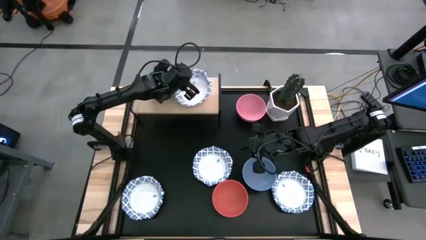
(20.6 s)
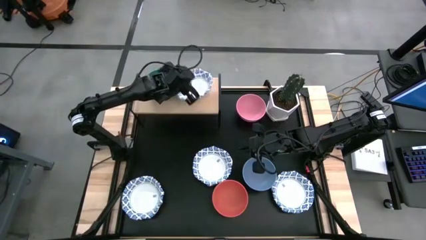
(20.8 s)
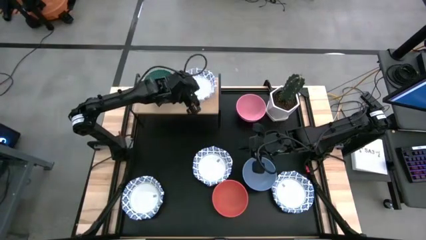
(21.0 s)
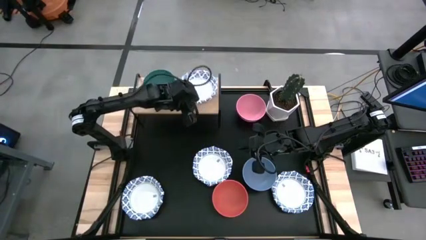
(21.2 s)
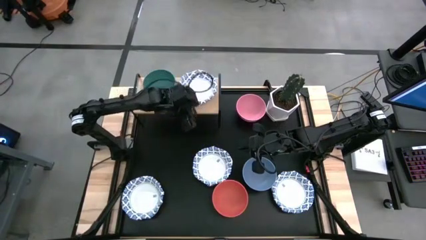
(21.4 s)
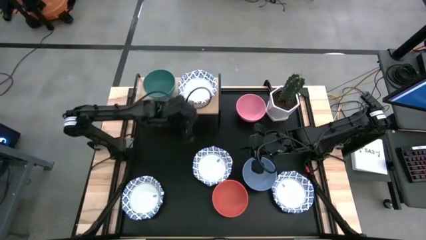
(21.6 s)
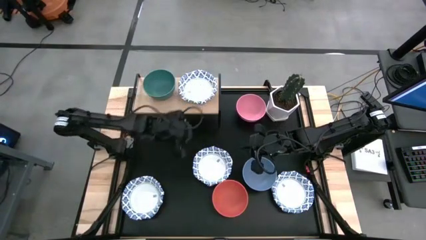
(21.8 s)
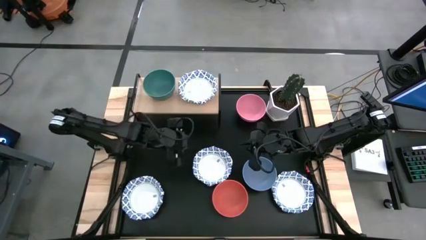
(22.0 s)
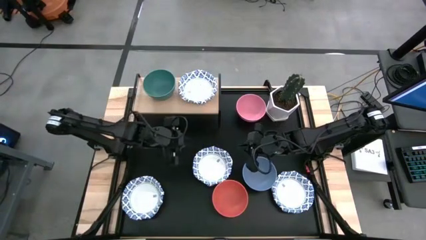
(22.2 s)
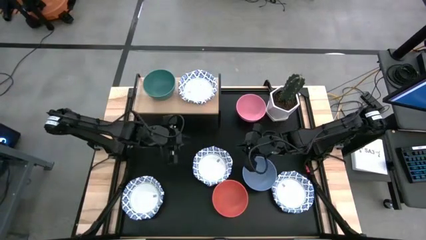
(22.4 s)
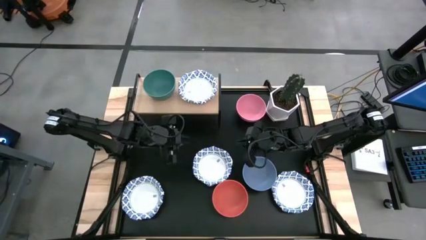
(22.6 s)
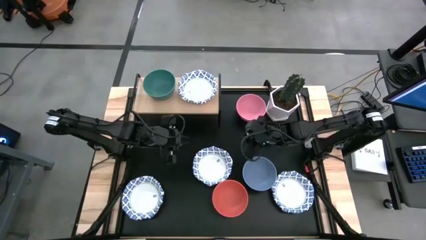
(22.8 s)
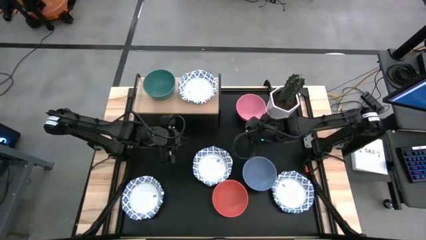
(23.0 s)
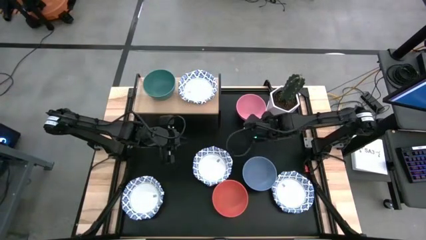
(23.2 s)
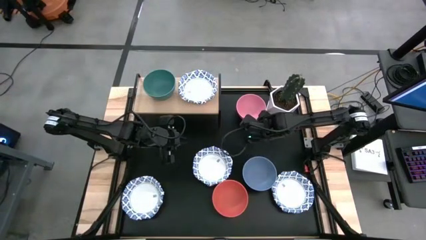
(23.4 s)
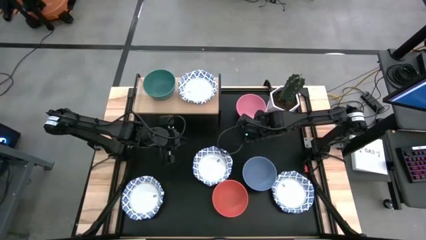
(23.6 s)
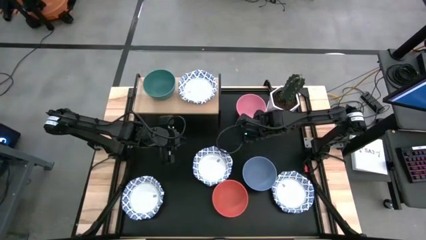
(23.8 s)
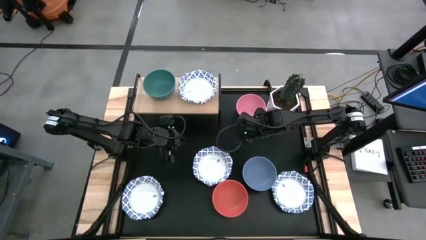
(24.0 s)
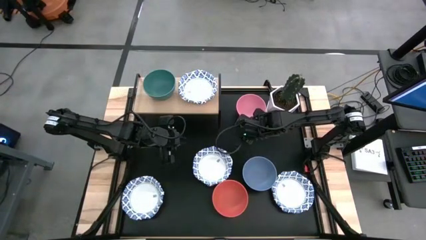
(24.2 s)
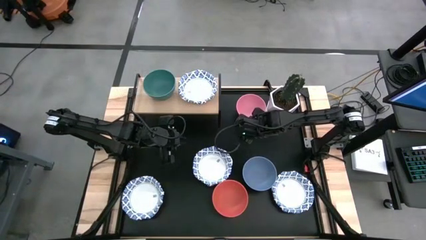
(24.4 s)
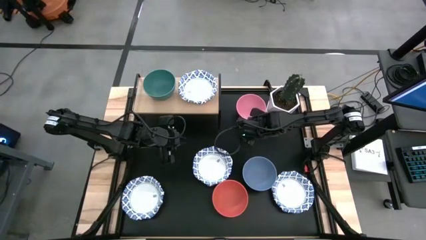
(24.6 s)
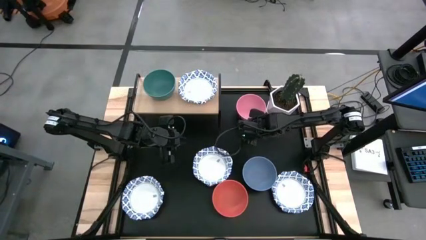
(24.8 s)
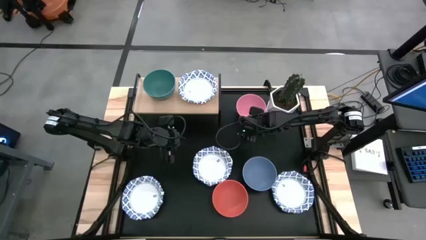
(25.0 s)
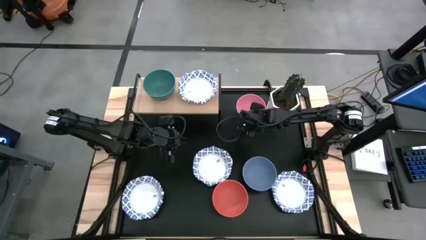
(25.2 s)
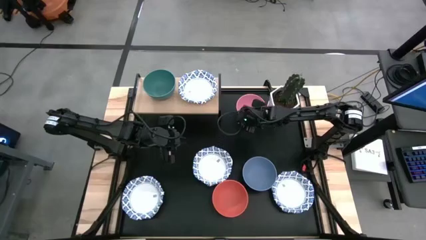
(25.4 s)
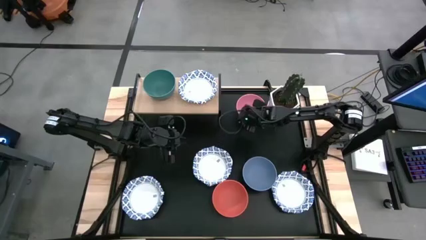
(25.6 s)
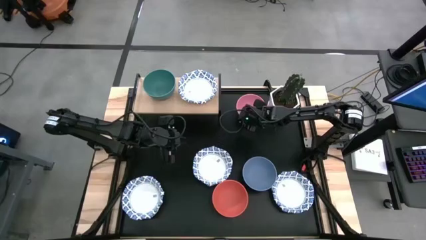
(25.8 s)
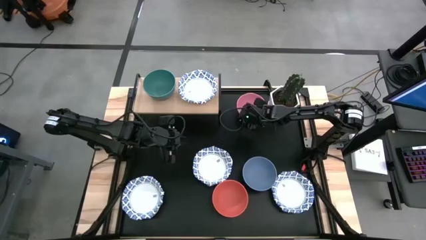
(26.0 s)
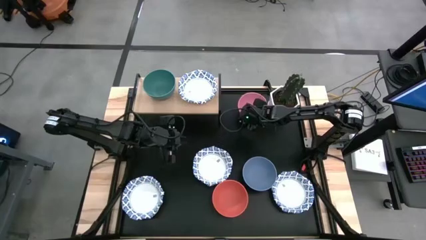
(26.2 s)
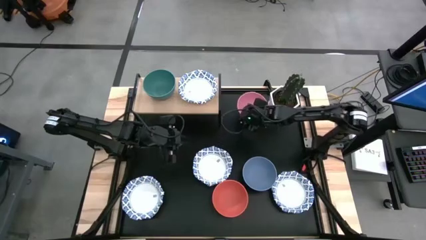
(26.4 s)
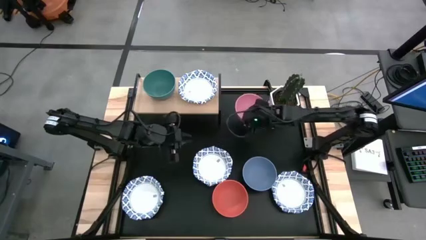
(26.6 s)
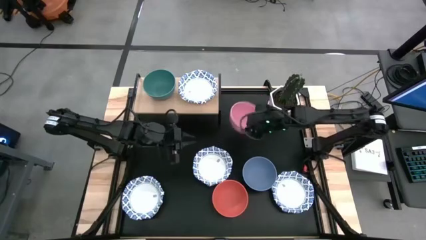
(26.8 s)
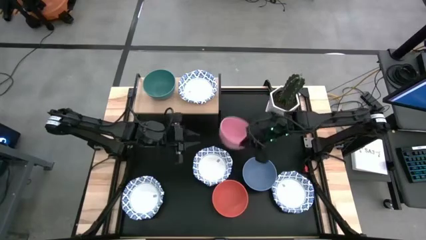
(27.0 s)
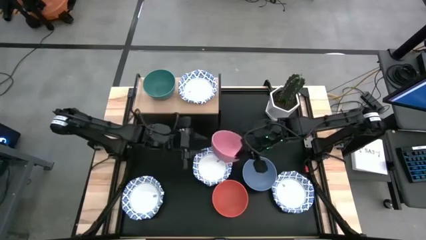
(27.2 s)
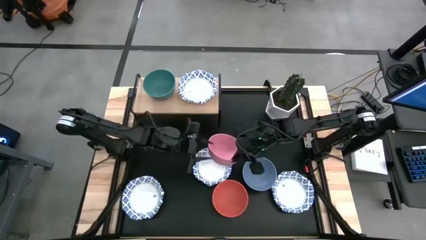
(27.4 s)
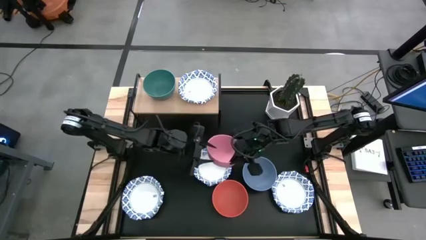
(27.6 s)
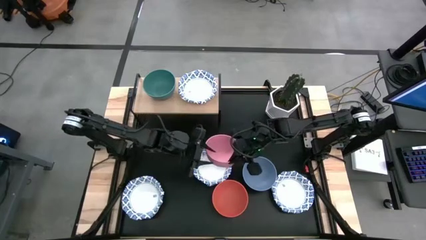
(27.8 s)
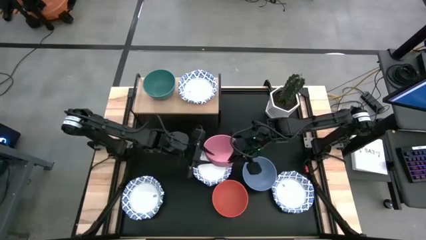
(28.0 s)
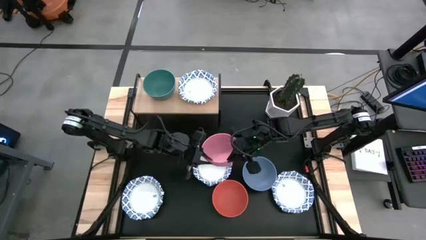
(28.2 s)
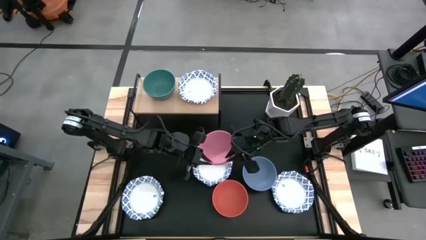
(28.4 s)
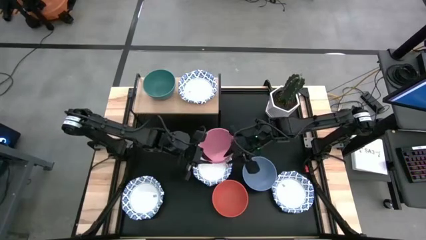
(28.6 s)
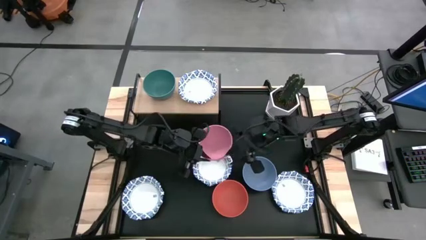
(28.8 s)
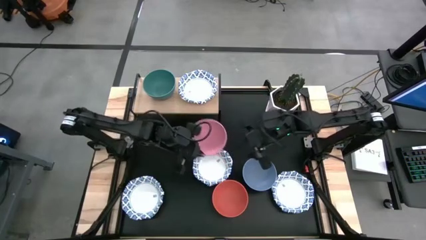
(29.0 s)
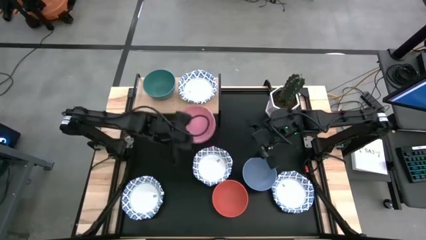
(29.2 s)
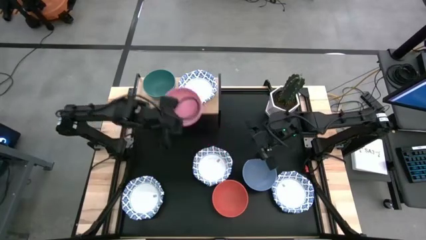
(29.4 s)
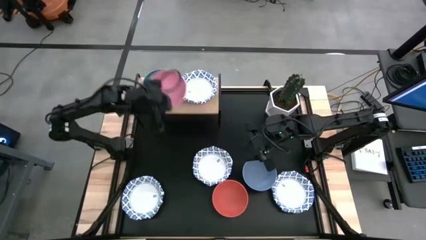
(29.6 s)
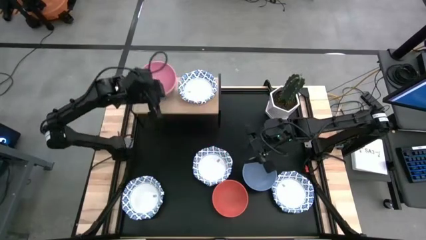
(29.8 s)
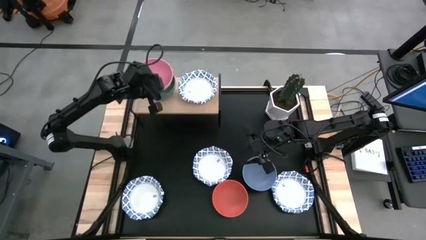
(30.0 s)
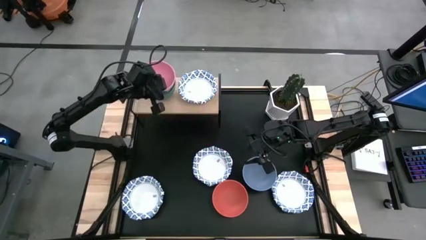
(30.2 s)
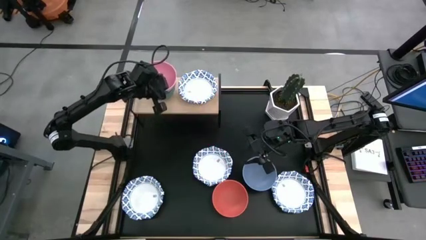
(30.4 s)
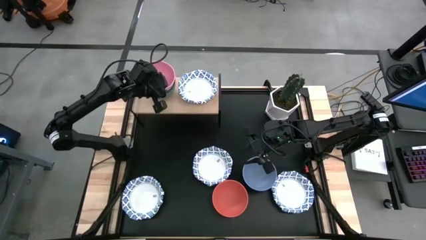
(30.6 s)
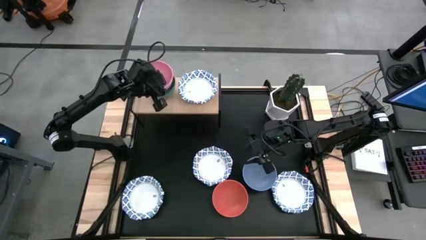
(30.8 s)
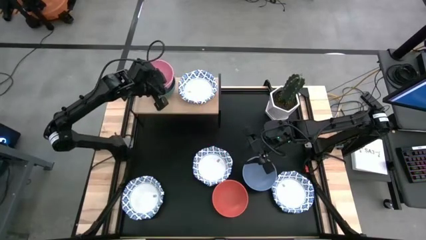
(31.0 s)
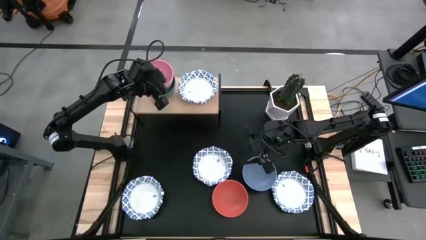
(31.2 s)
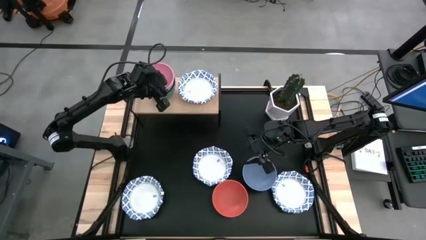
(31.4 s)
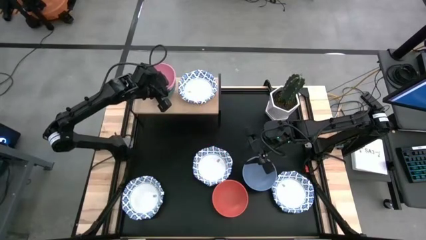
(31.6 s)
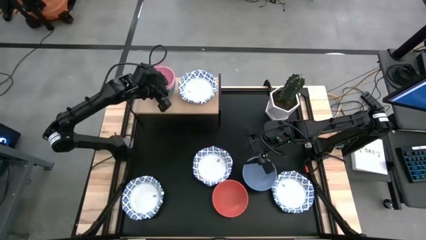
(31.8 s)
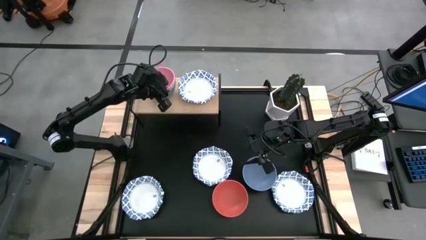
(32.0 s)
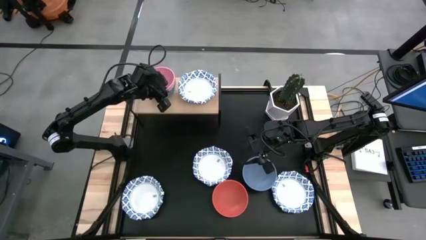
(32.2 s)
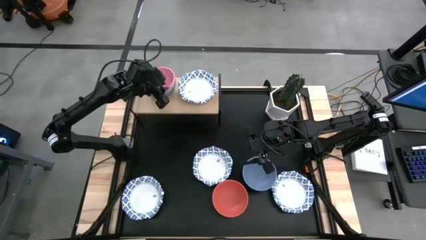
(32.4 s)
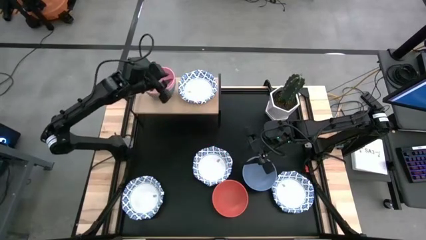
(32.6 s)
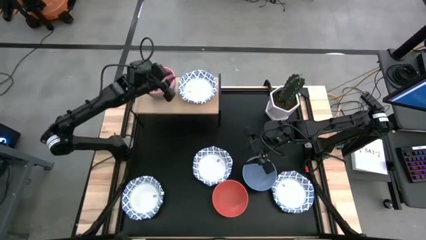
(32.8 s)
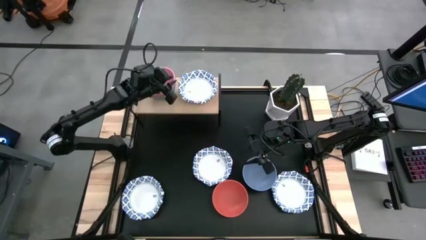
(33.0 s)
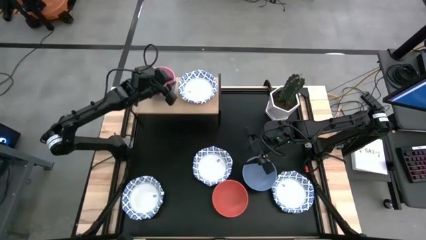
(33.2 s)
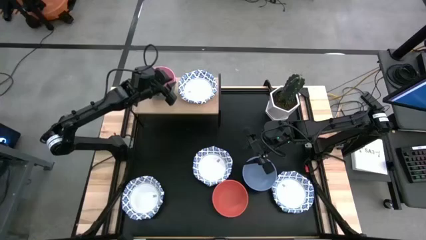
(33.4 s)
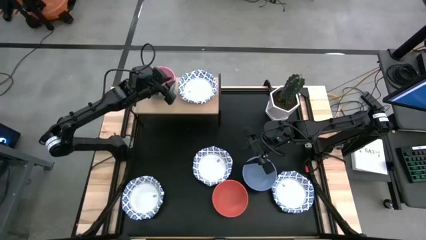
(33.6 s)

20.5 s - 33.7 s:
Task: Place and stack bowls onto a shelf
Stack the pink bowl on top of the green bowl on the shelf

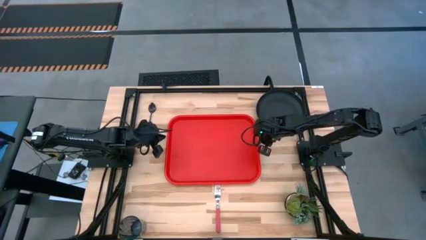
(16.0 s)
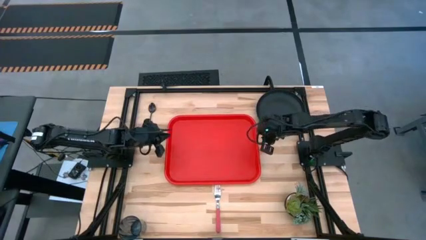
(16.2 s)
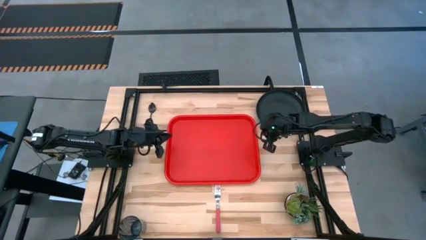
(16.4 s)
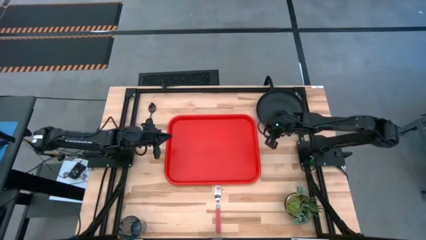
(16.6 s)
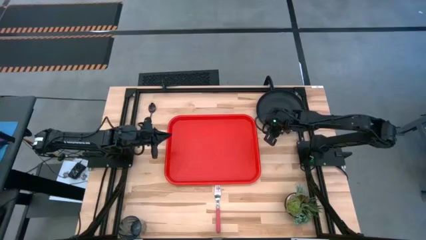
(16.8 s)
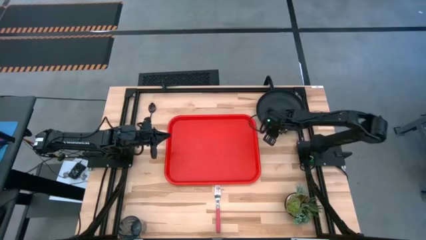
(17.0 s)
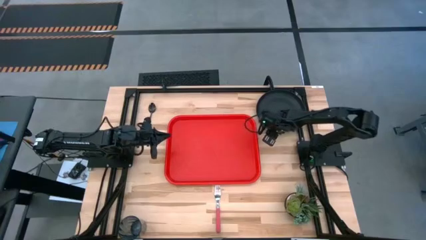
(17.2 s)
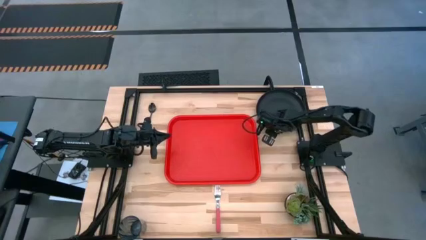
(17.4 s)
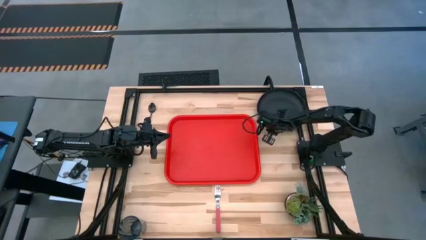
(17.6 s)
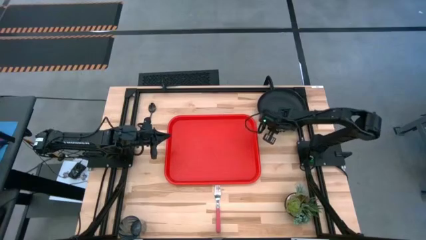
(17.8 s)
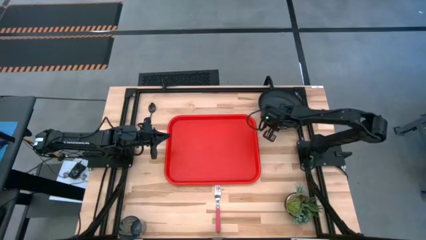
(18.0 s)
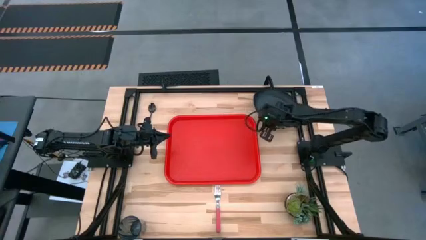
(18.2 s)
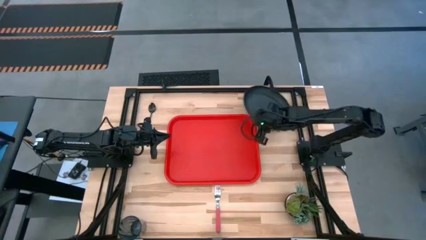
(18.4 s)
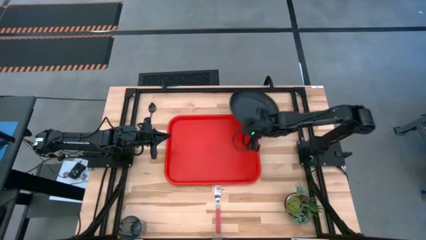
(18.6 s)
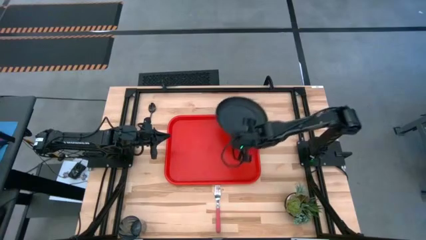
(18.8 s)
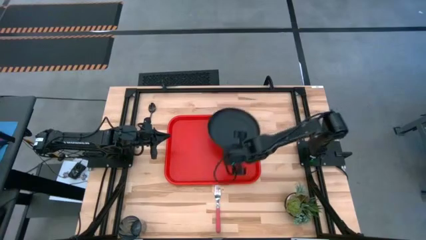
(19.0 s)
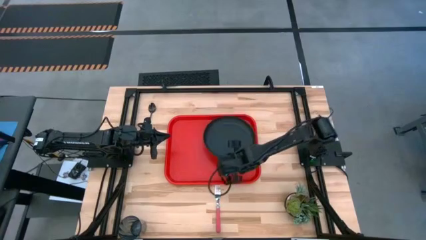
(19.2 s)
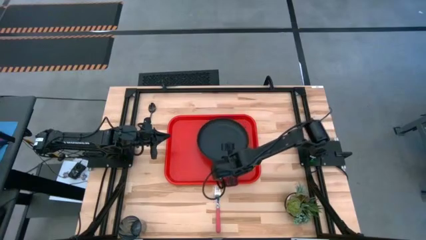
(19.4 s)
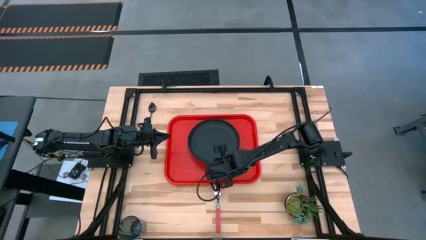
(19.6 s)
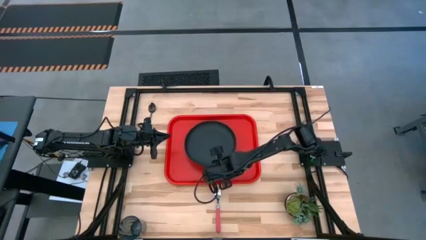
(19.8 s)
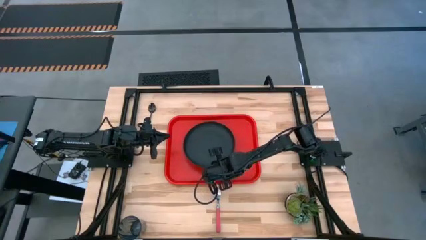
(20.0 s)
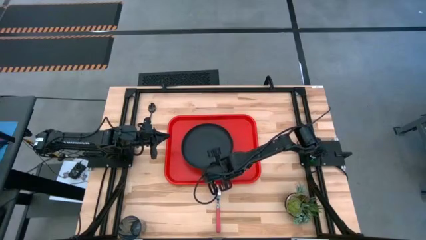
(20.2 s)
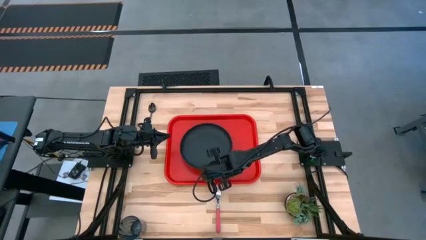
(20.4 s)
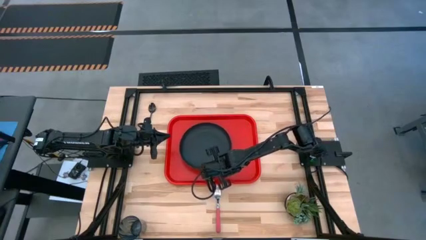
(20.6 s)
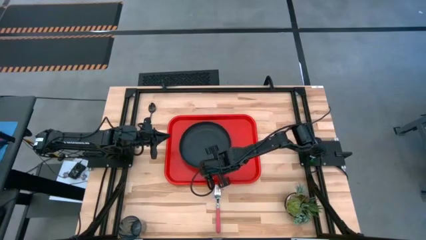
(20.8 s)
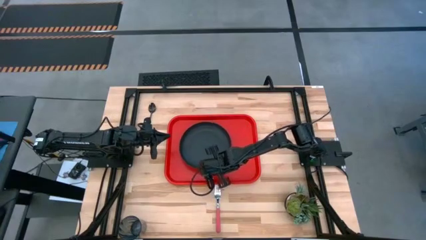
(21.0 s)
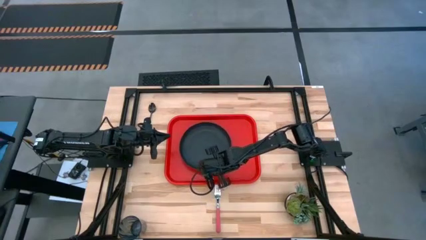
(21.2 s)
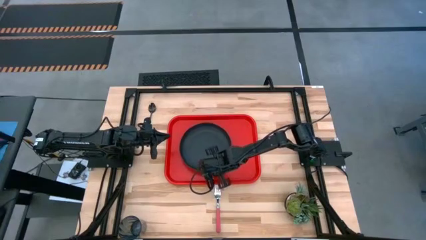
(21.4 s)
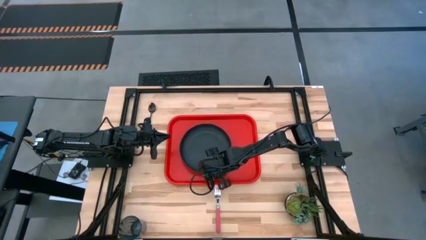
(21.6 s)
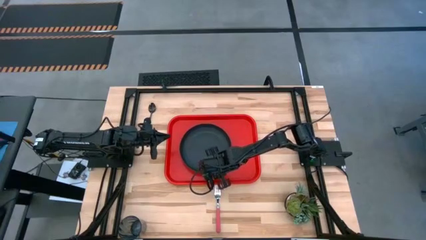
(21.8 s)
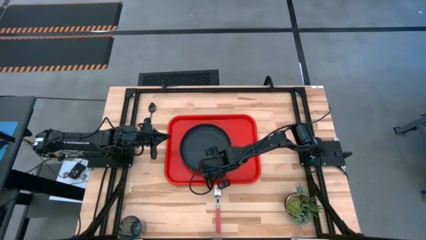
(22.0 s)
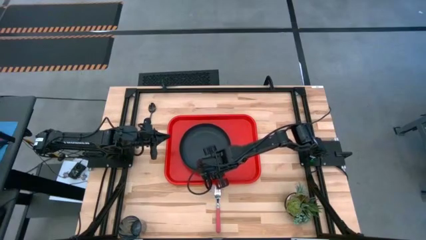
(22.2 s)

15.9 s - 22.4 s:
Task: Pick and place plate/cup/fork/spoon on tray
Put the black plate on the red tray
